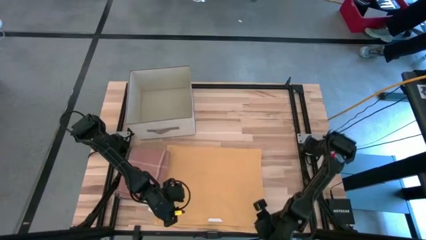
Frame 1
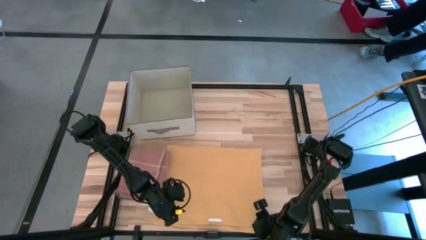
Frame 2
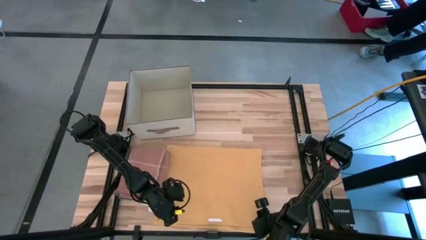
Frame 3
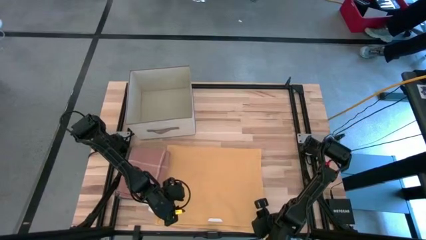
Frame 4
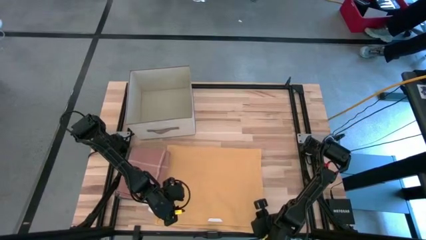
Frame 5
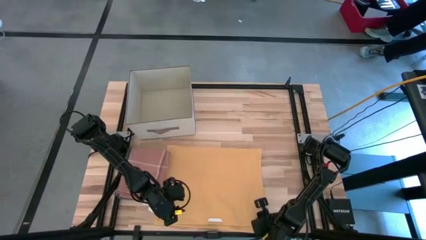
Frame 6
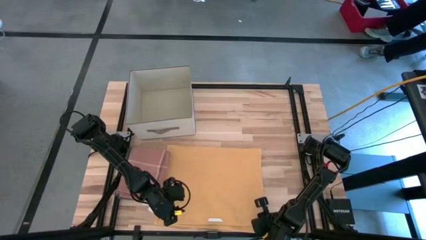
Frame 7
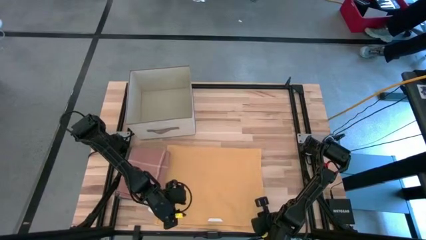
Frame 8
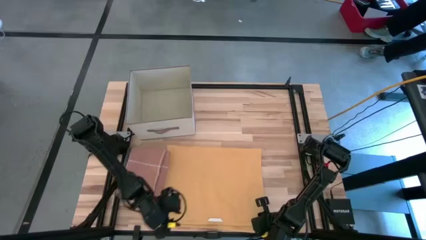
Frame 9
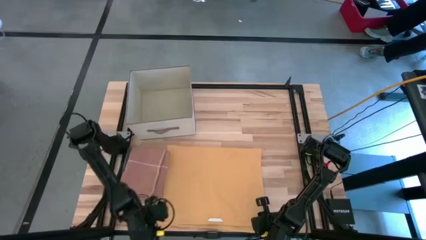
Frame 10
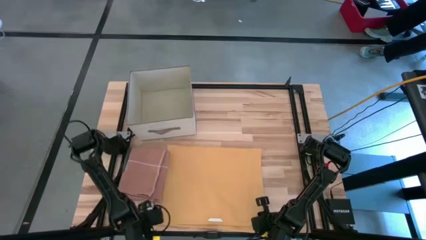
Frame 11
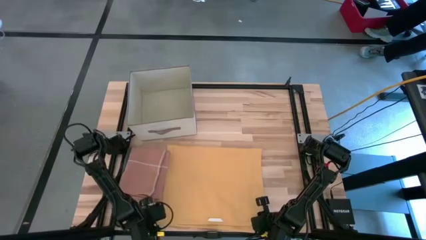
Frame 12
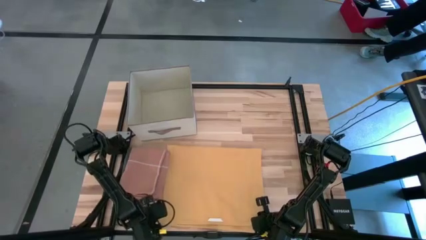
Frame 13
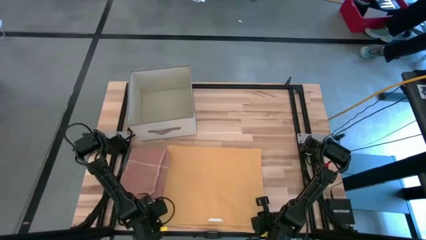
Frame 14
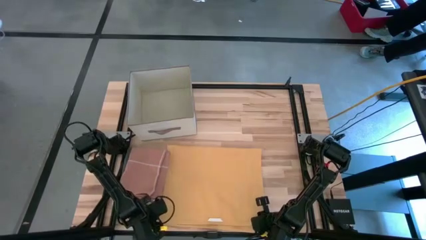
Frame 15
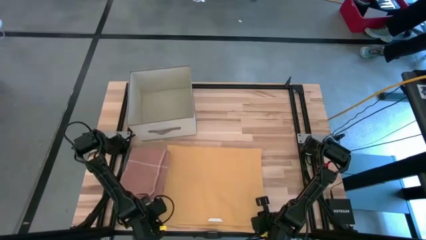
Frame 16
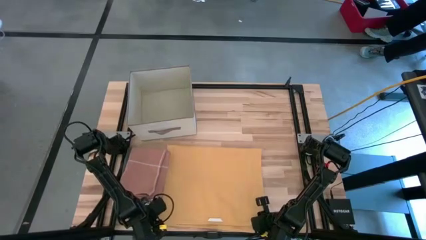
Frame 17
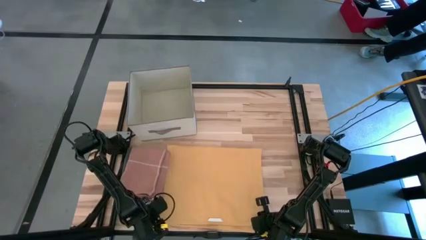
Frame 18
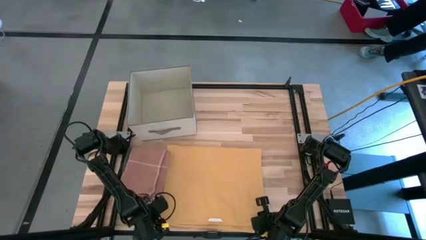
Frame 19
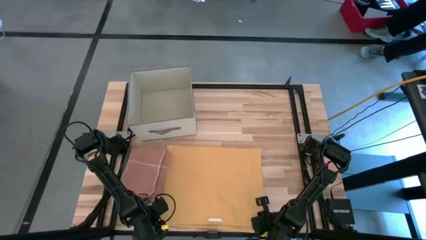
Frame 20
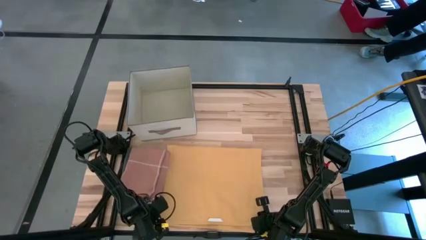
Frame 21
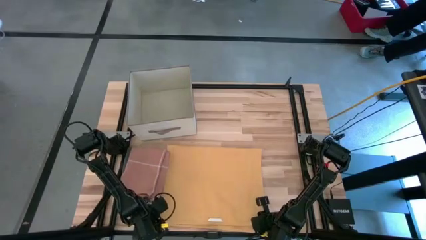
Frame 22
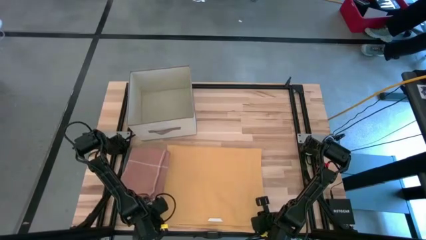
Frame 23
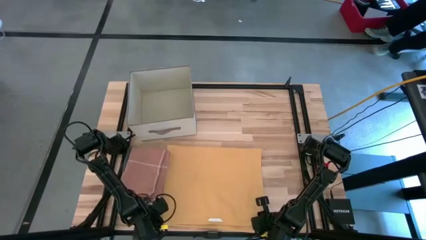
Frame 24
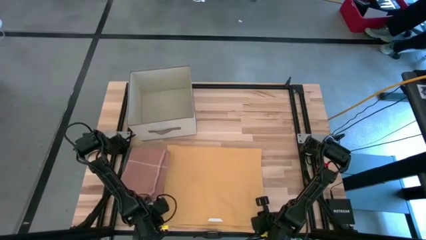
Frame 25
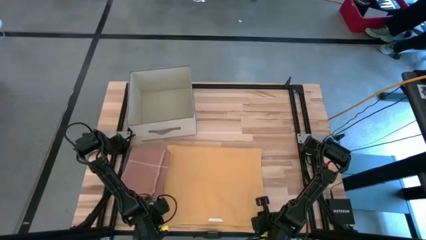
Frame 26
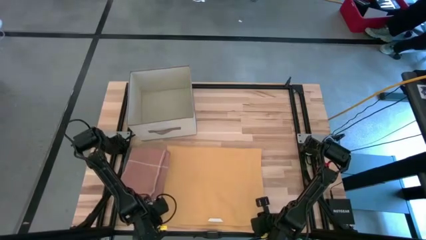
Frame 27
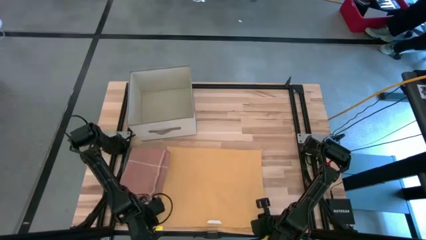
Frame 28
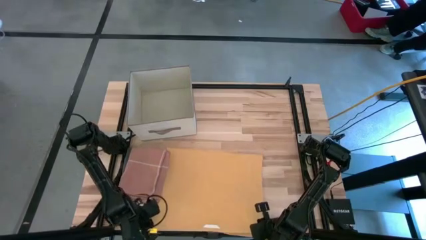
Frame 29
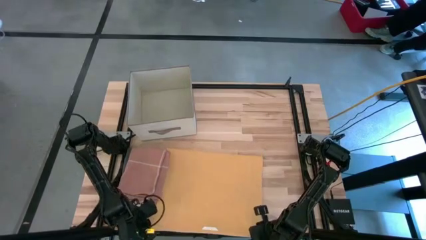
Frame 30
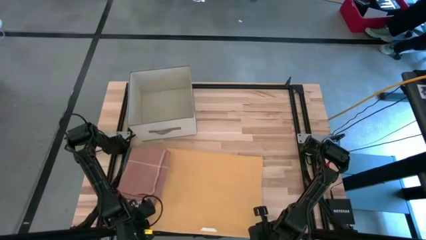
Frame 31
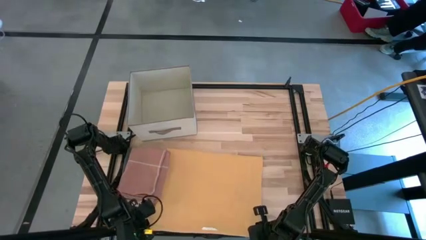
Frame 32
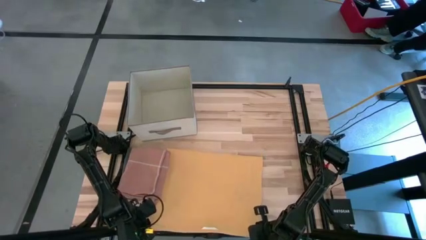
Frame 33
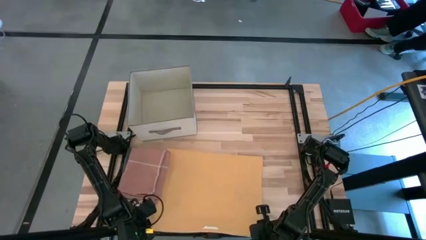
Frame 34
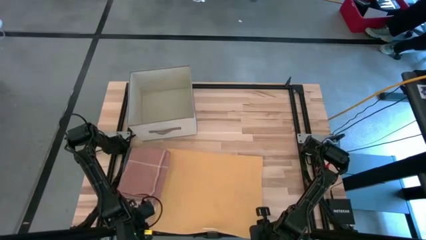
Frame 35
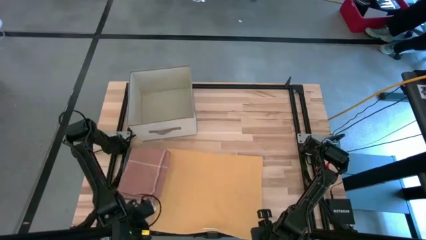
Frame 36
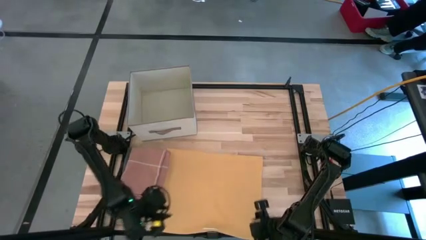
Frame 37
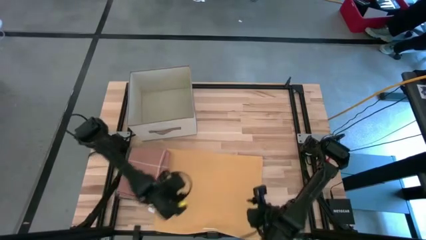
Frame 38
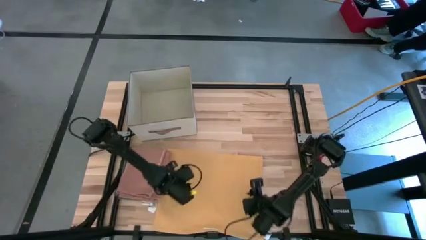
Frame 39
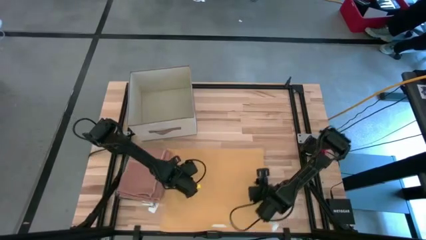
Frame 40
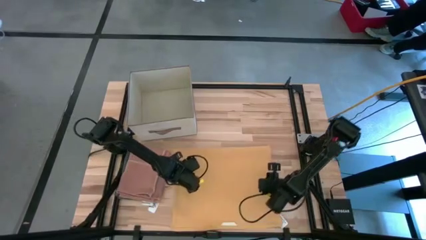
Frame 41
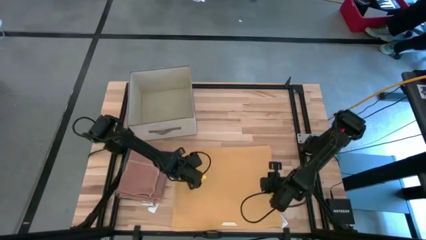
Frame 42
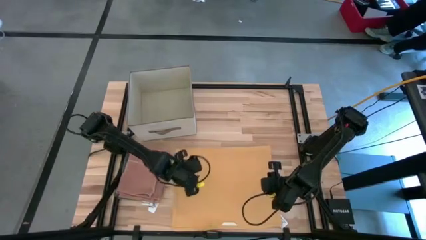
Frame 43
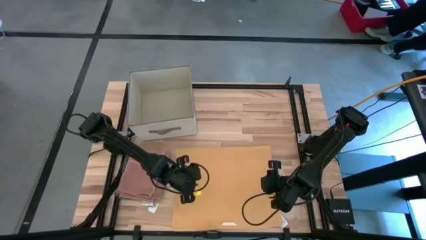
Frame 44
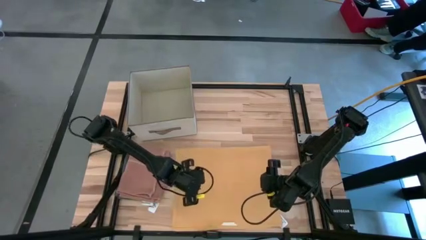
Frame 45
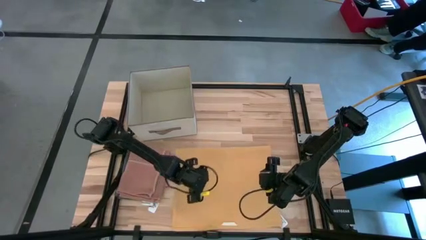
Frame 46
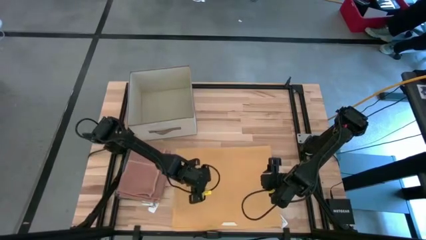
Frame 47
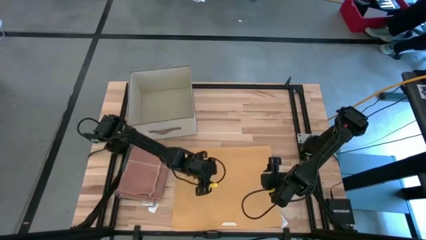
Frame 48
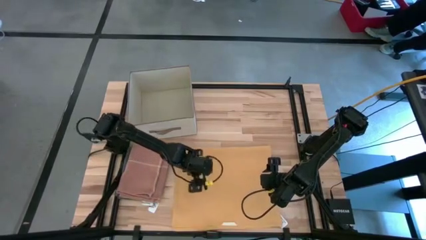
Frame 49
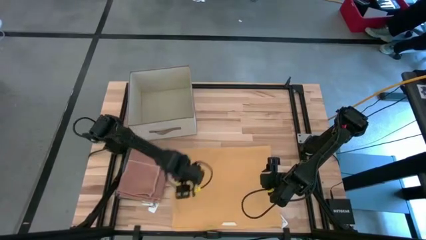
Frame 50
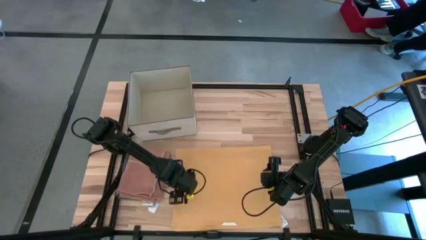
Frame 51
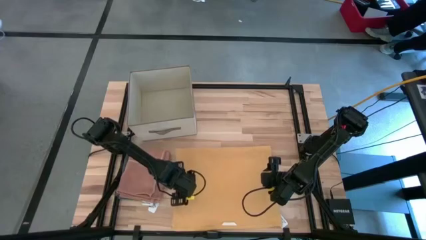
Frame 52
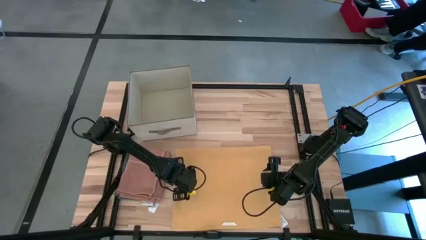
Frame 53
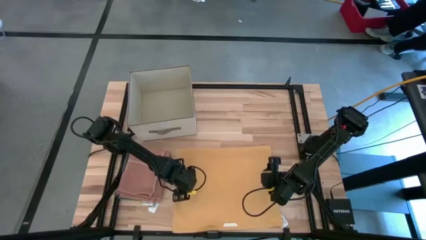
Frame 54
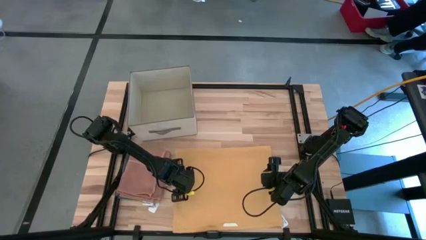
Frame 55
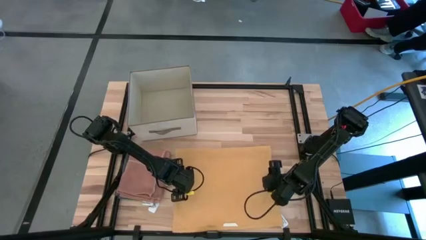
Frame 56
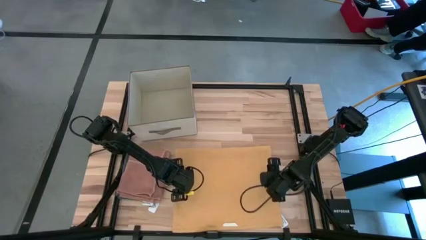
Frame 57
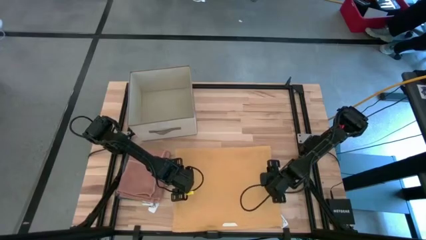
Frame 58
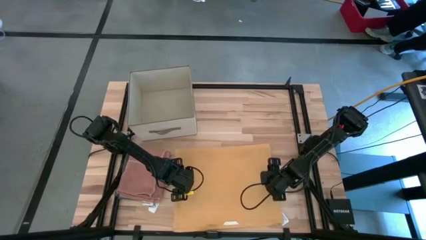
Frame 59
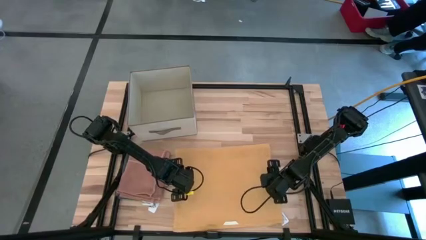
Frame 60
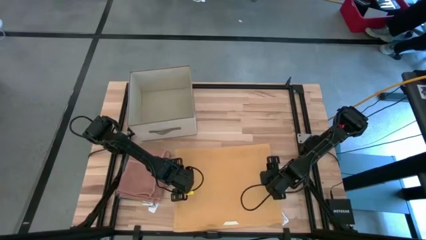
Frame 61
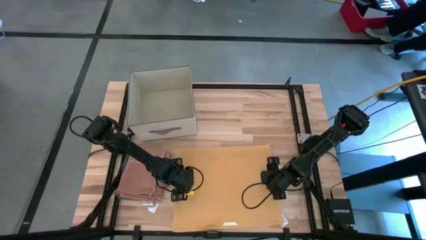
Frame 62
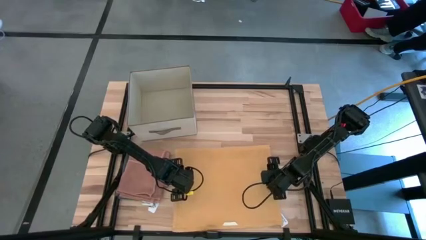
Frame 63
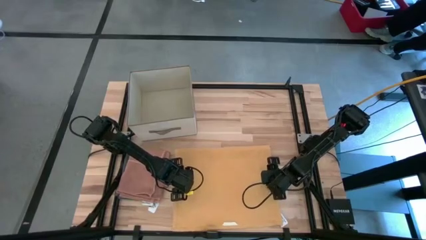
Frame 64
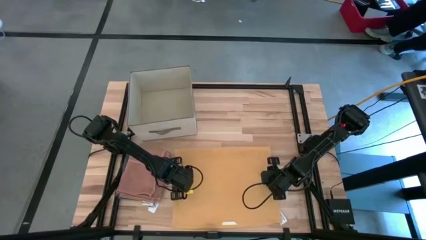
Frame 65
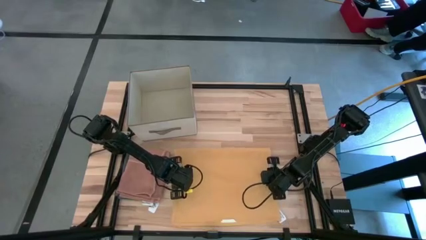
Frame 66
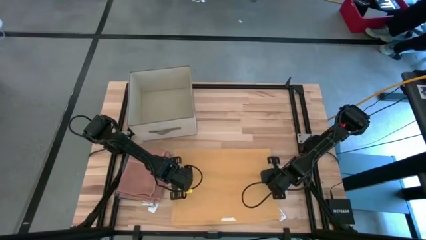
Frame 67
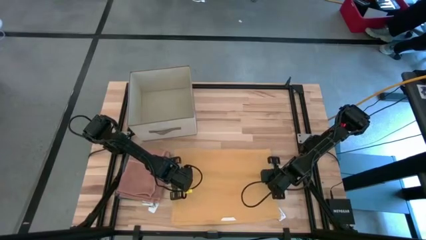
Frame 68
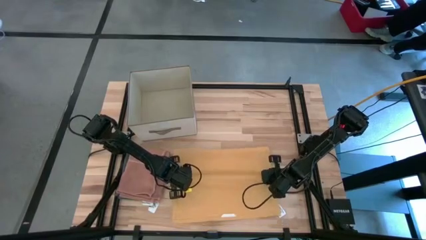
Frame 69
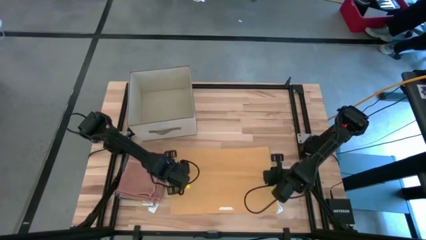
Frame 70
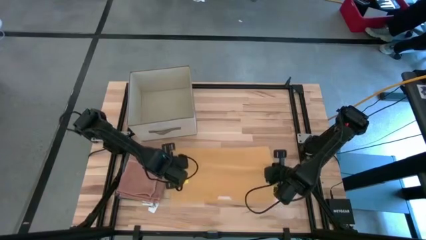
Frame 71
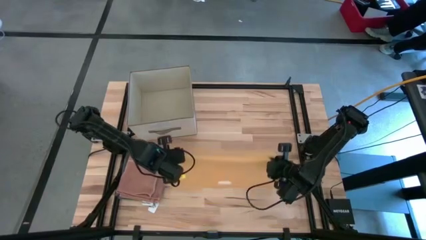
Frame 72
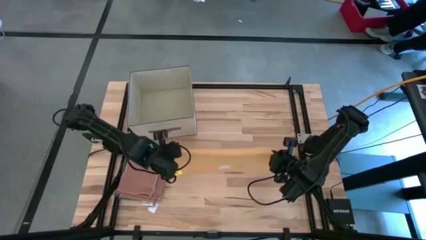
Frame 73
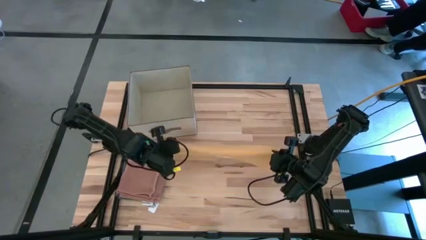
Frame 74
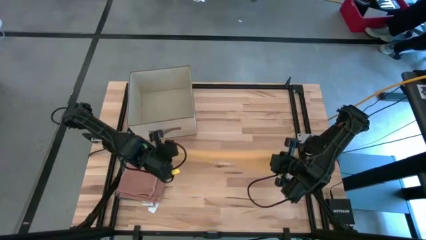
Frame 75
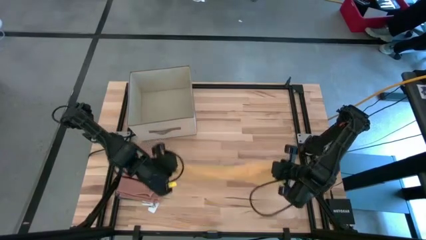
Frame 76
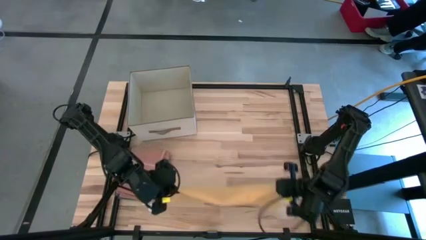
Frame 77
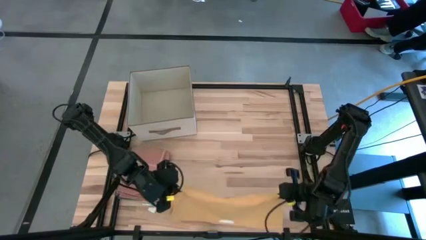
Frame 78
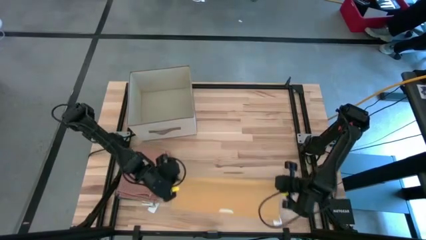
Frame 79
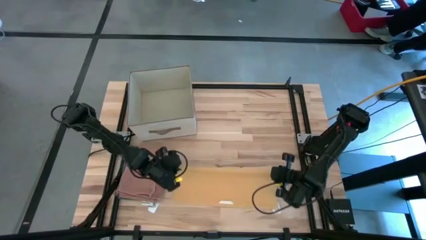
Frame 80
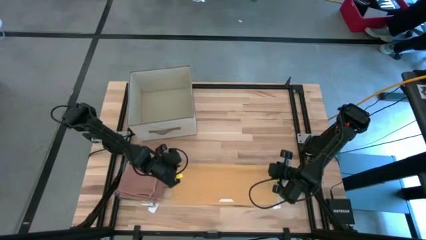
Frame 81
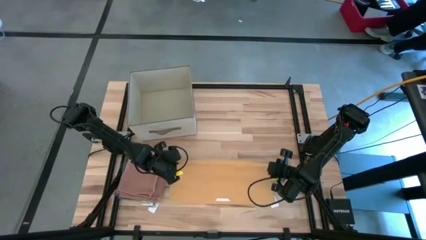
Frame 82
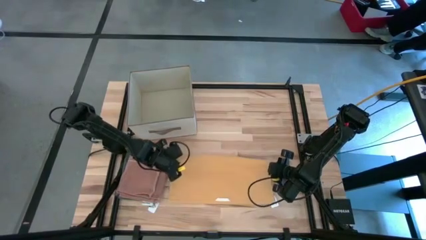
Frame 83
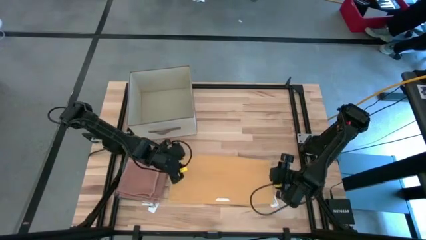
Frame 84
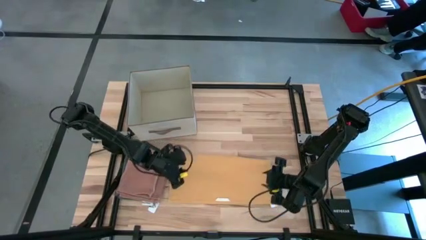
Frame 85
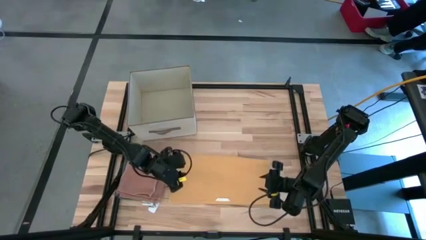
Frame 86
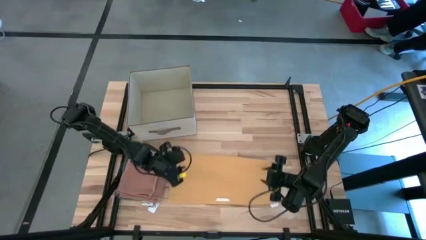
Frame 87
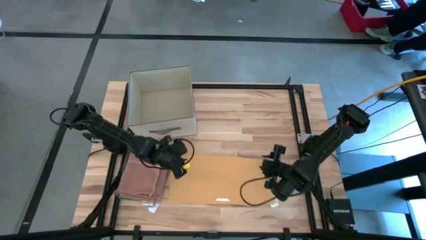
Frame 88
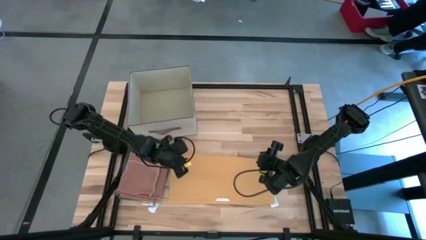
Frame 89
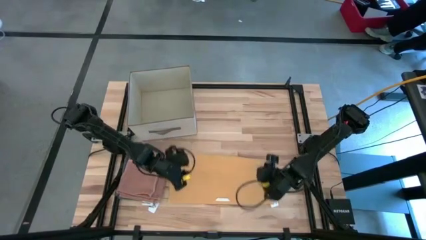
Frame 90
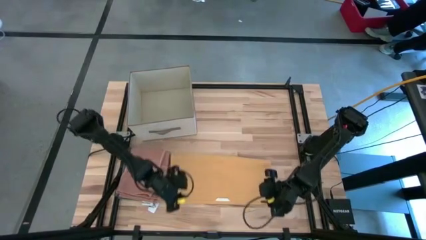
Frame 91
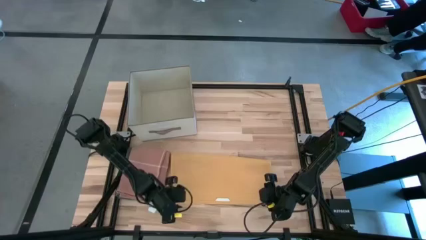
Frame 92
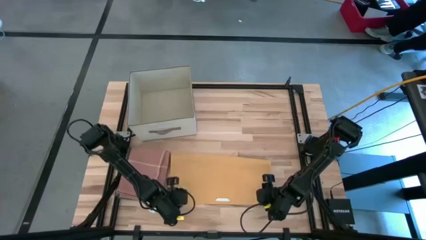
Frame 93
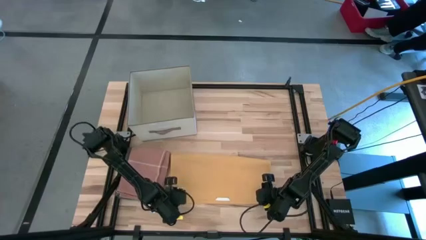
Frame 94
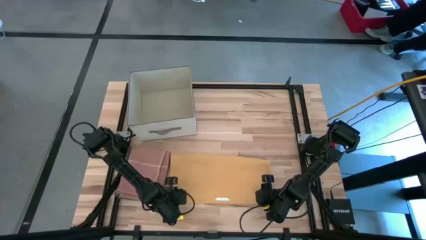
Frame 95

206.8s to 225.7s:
Task: Fold towel
Fold the yellow towel
